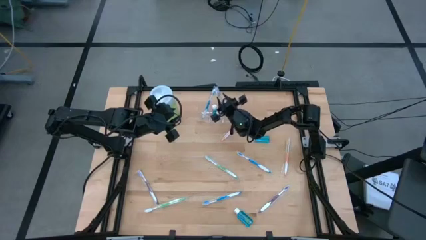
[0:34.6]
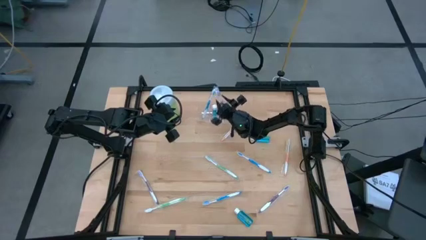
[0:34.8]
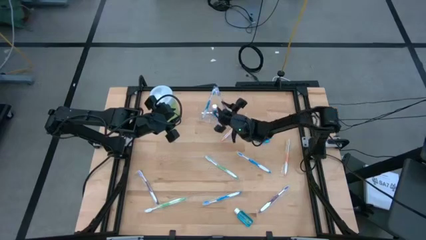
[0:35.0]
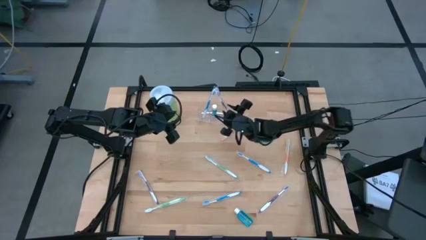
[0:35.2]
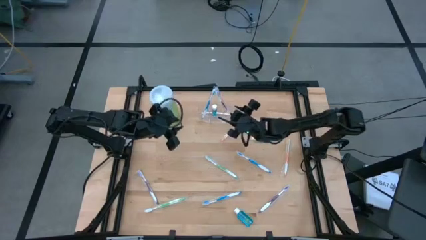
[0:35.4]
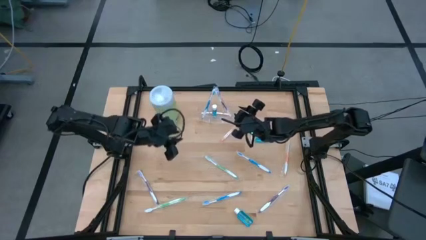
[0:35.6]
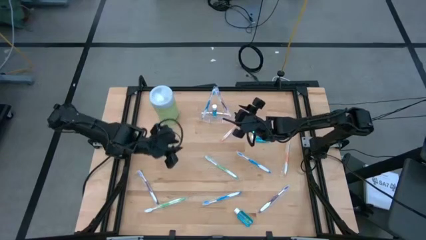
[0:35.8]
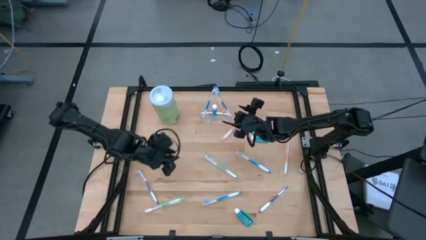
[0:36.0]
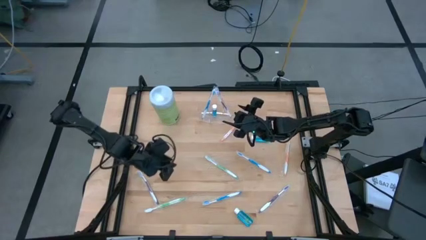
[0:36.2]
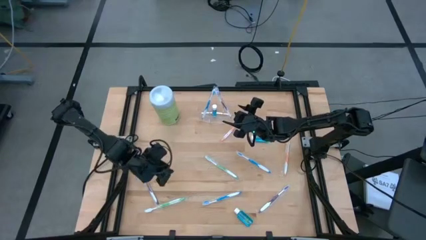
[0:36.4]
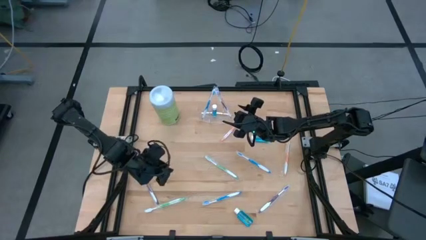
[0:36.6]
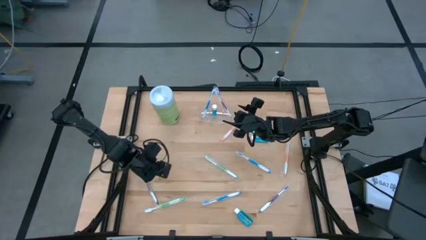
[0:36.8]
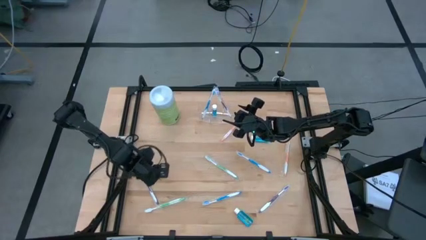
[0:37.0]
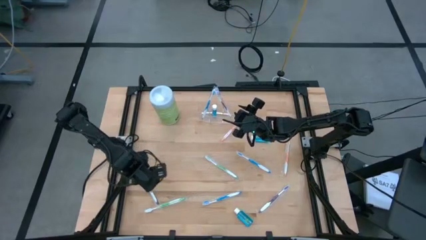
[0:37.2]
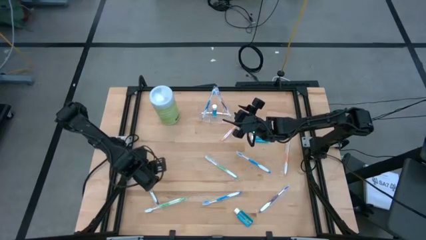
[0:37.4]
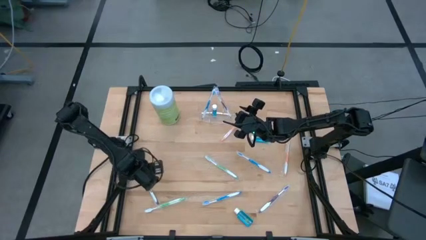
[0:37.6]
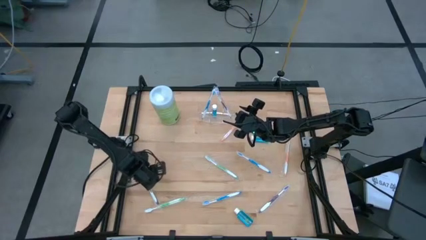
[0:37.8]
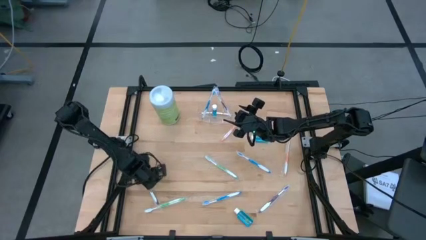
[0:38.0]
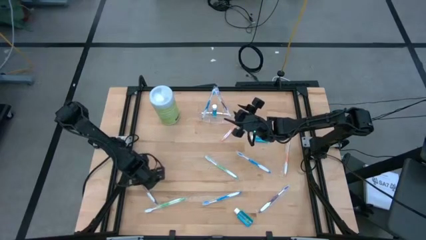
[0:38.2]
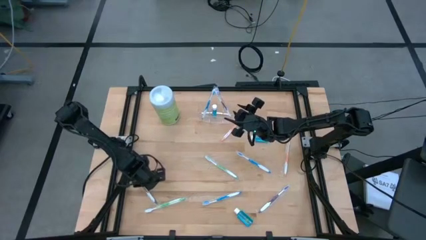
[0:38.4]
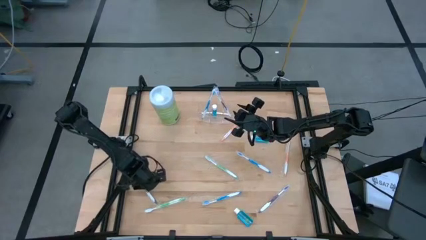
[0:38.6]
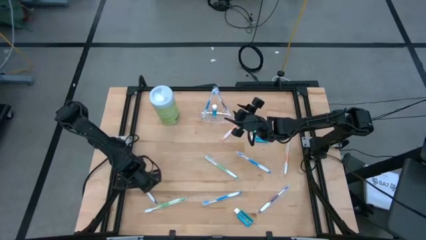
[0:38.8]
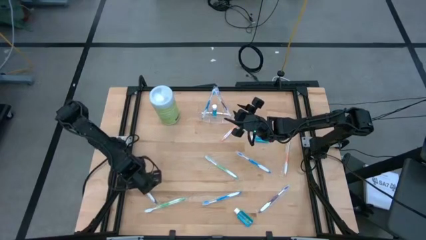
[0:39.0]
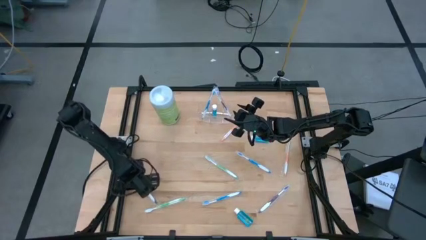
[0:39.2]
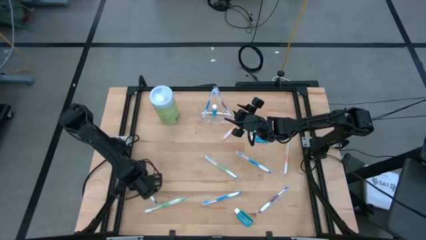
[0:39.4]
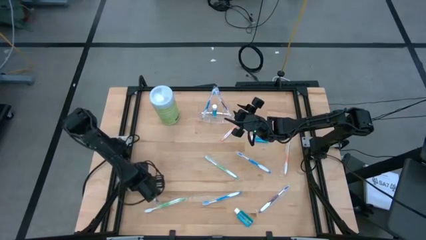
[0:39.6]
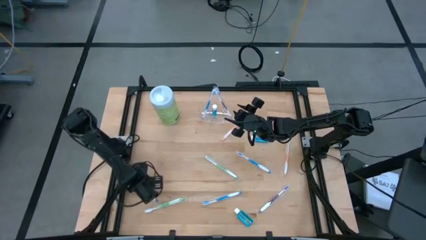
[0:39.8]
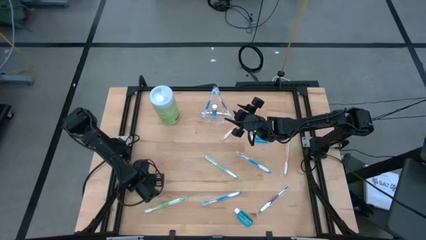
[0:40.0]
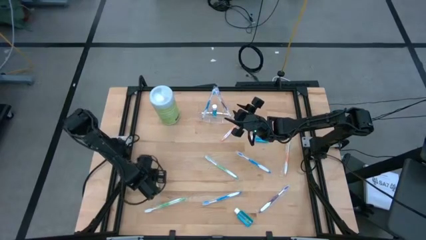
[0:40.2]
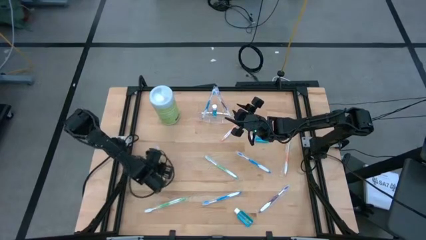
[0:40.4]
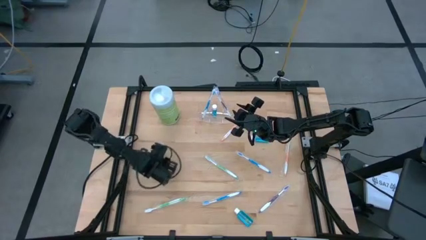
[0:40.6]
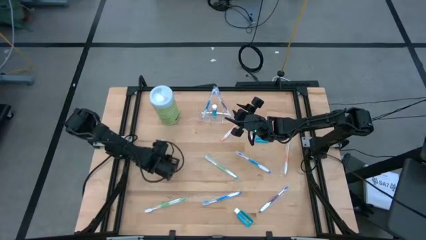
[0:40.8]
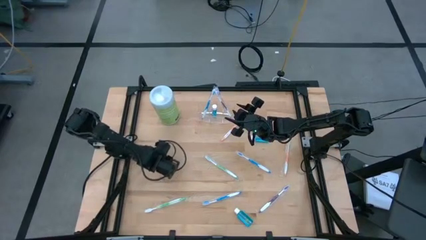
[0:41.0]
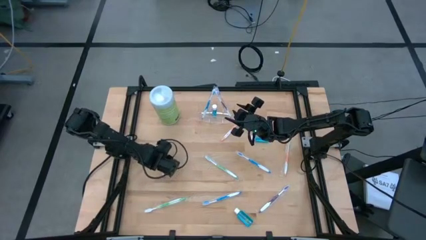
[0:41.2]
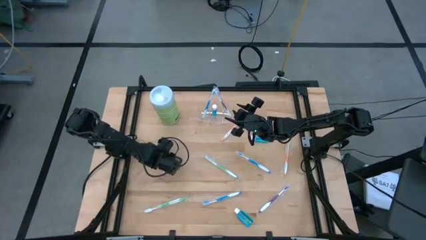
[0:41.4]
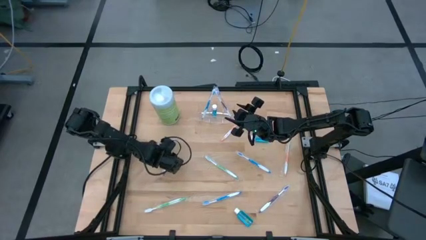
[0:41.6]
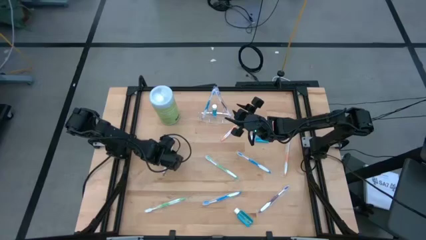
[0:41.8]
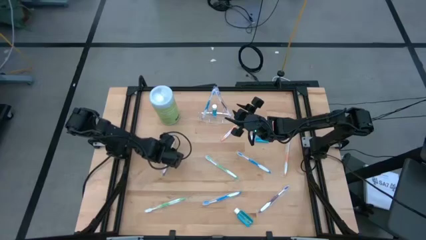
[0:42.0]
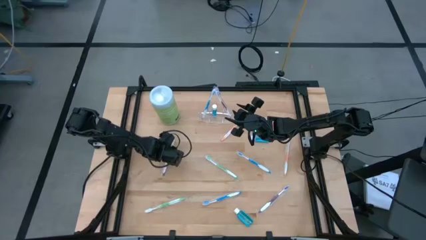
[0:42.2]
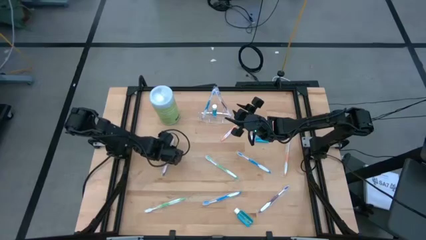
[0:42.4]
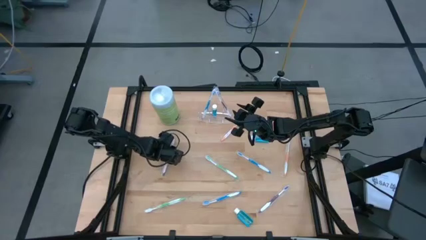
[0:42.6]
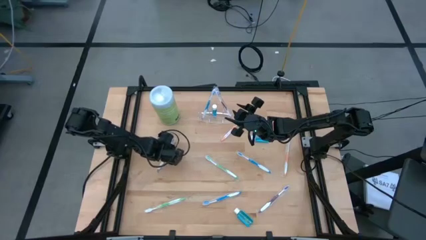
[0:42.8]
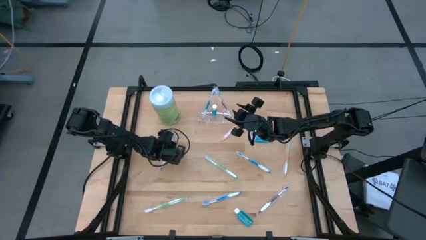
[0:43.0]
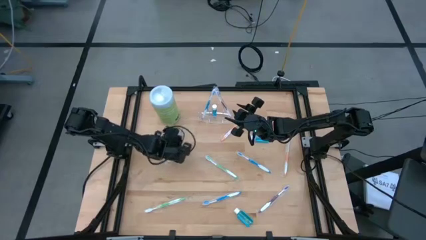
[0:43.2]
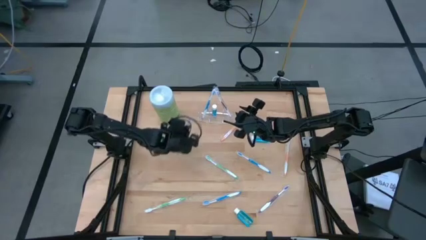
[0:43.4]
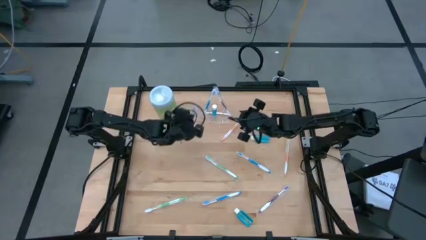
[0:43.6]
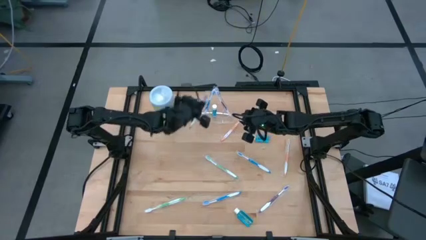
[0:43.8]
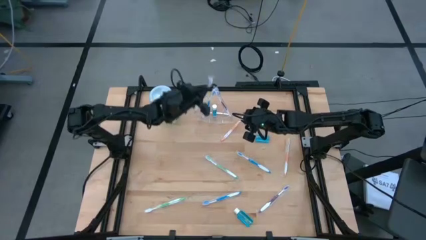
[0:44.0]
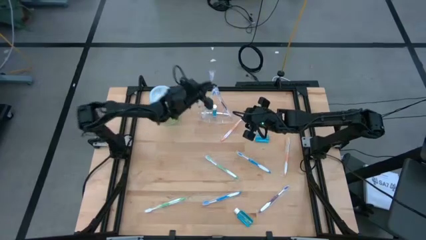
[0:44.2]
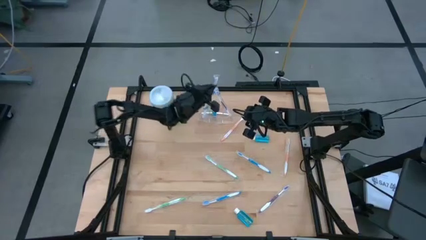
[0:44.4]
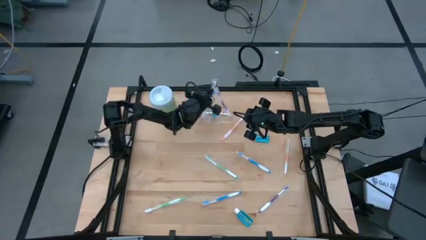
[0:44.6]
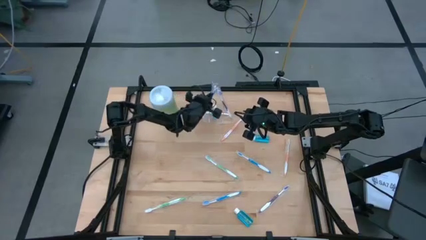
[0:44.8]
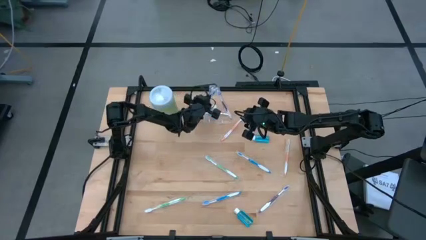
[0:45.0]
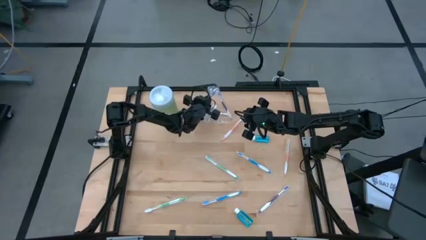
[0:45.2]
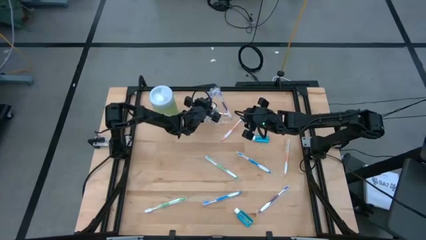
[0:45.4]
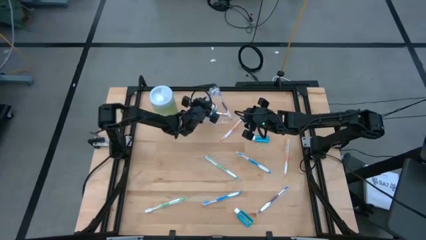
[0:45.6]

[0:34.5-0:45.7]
Task: Pick & Place toothbrushing station
Put the left violet toothbrush into the transparent organizer

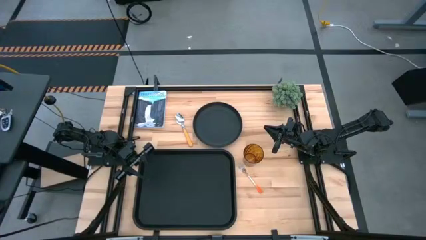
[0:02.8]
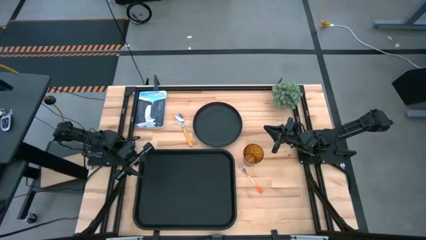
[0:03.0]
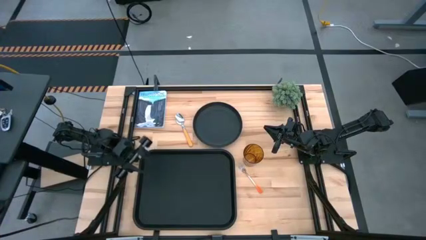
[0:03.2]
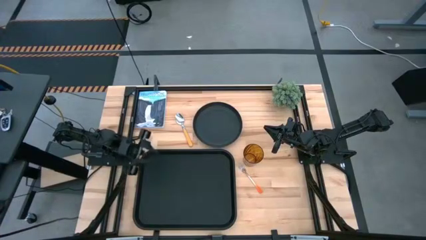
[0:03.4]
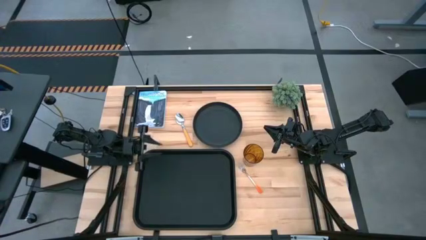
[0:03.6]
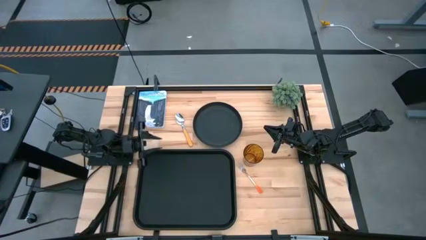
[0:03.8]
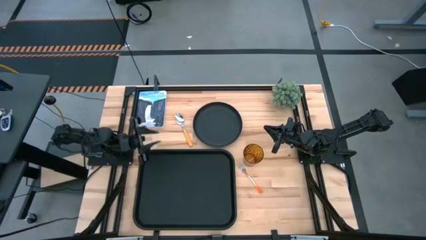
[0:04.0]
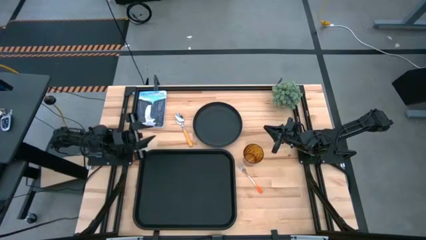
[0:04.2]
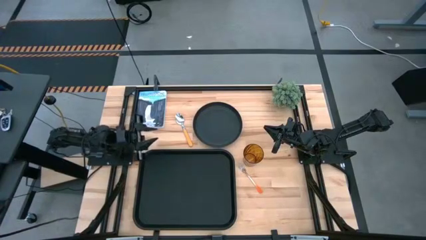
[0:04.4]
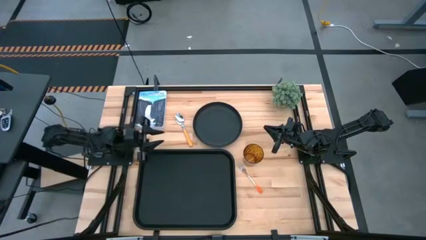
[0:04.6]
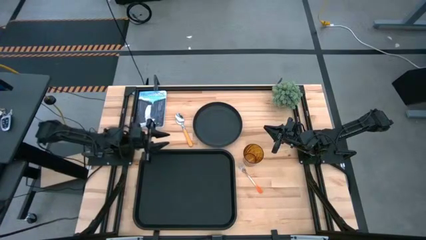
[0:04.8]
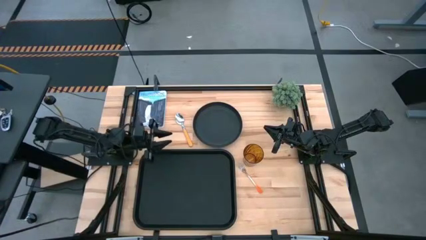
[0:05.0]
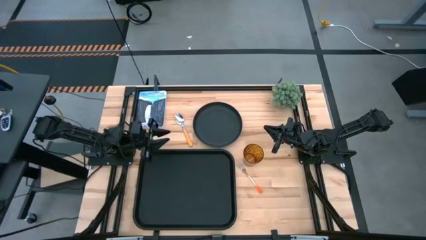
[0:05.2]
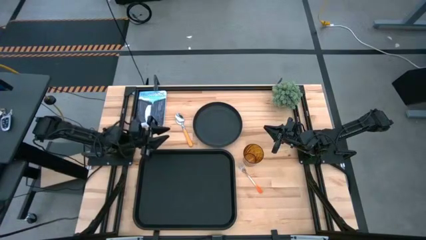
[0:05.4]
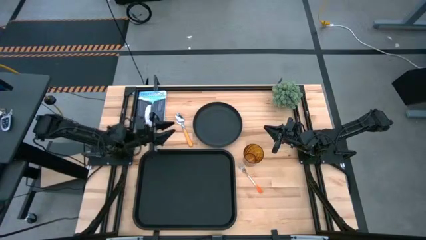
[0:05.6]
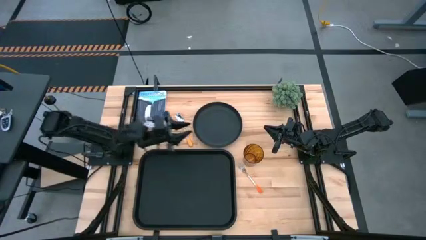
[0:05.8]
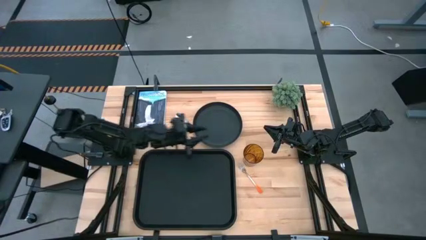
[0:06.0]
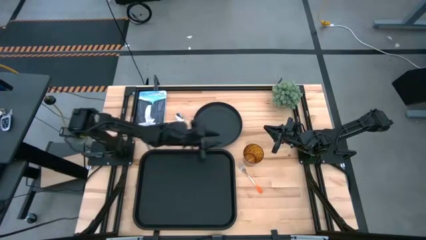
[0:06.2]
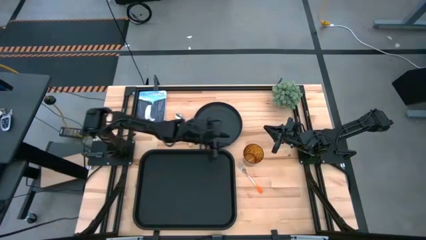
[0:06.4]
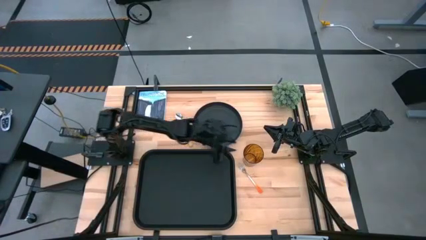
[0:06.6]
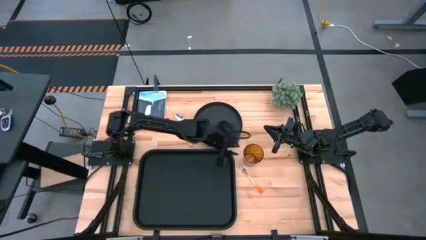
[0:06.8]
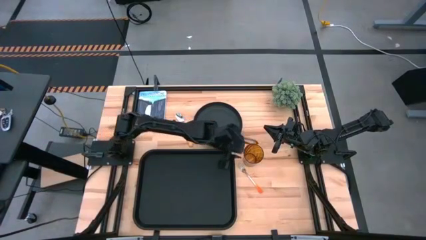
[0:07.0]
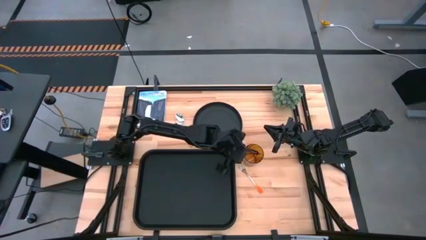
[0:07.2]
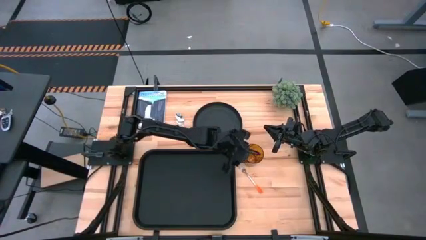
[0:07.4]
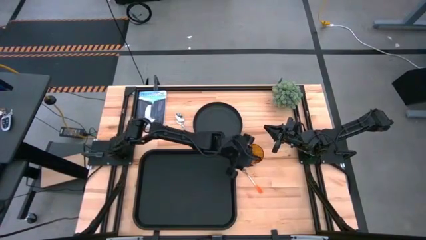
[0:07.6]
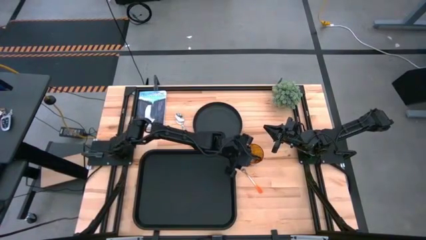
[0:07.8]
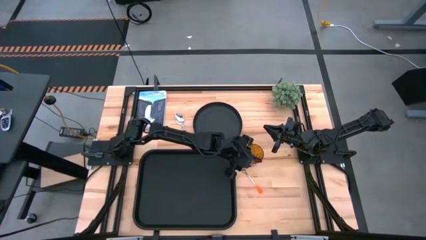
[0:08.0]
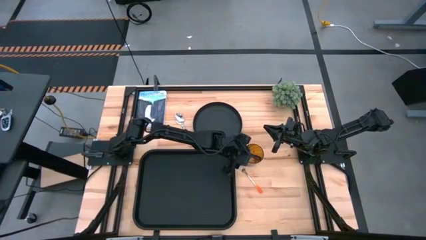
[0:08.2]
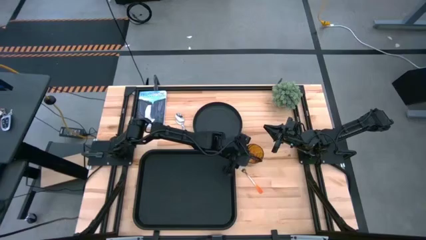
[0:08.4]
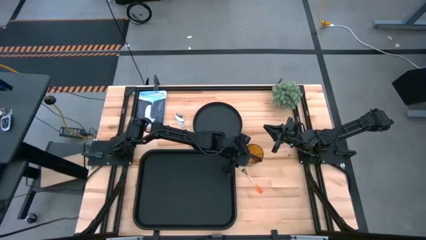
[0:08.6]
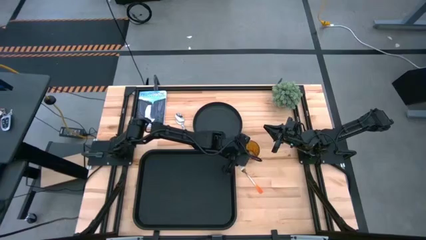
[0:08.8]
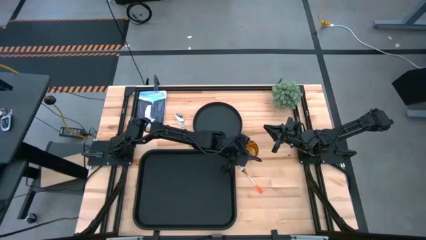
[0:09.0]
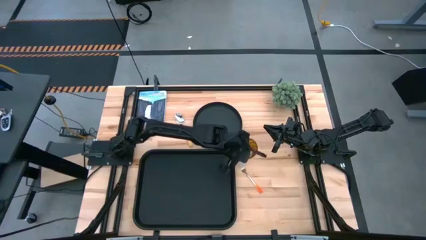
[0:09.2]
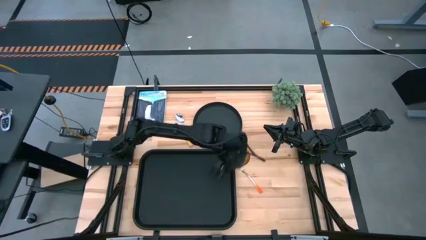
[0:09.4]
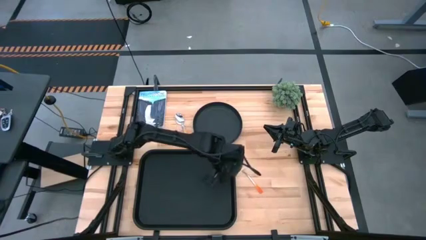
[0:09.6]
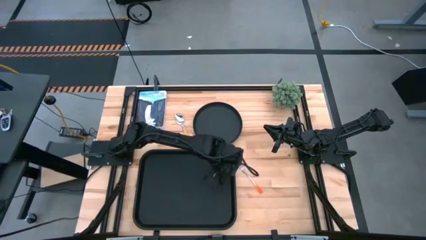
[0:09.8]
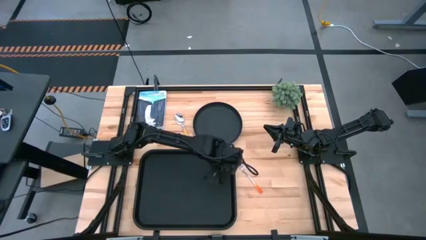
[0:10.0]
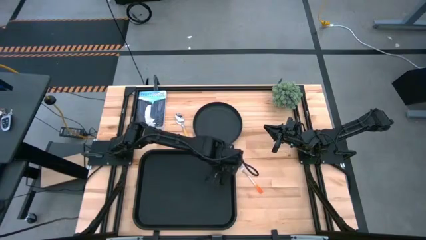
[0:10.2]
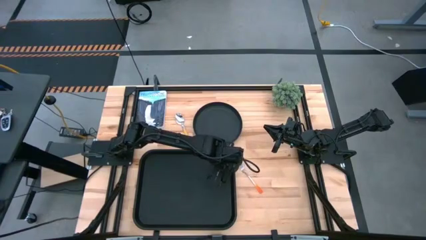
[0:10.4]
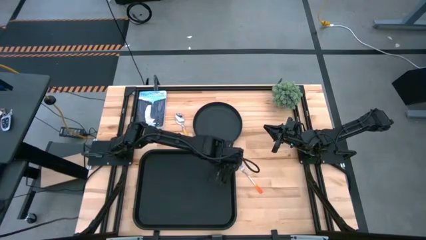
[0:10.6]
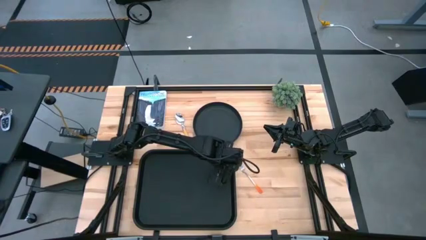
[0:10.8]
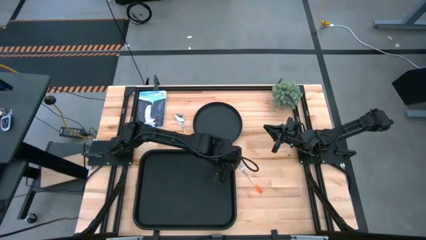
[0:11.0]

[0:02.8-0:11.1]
Task: Pick and place plate/cup/fork/spoon on tray
Put the brown cup on the black tray
